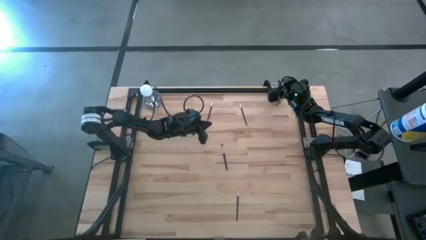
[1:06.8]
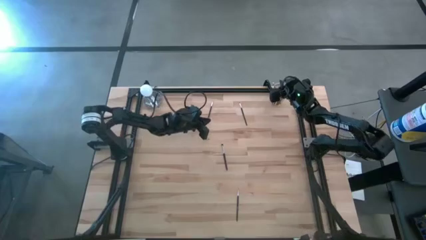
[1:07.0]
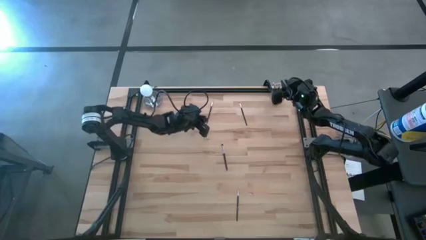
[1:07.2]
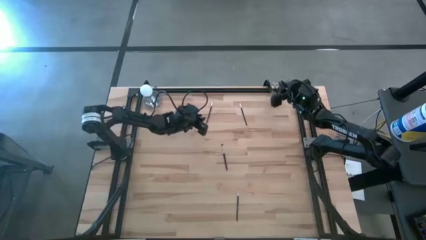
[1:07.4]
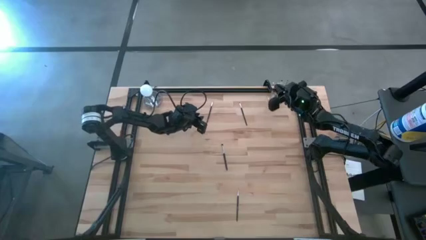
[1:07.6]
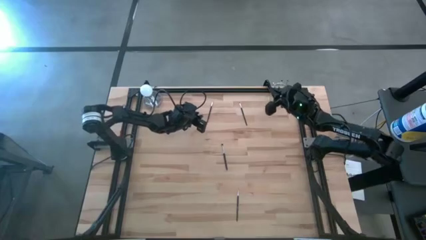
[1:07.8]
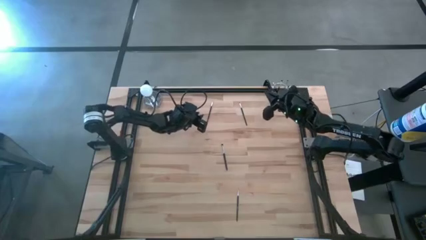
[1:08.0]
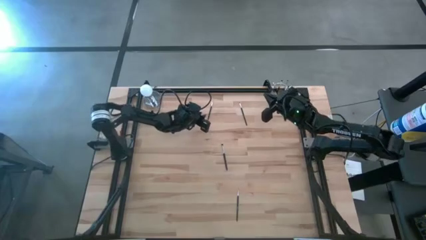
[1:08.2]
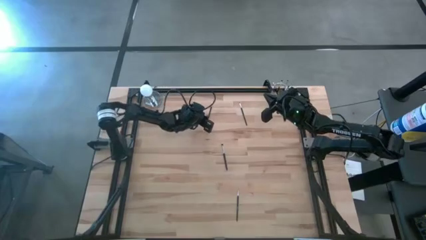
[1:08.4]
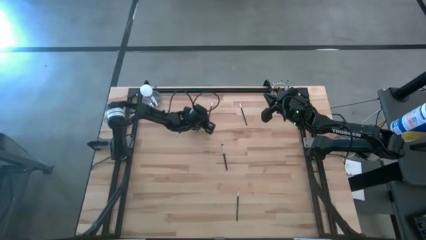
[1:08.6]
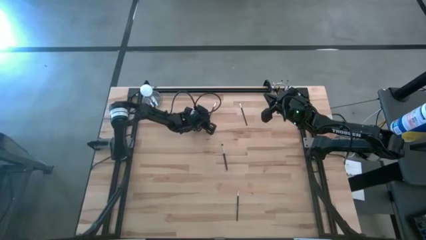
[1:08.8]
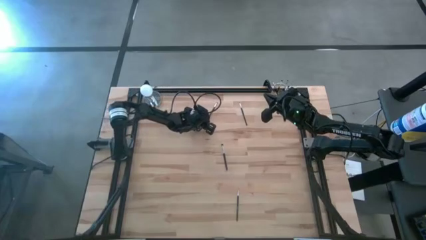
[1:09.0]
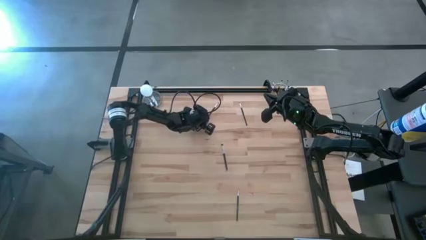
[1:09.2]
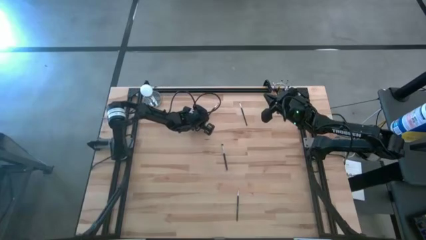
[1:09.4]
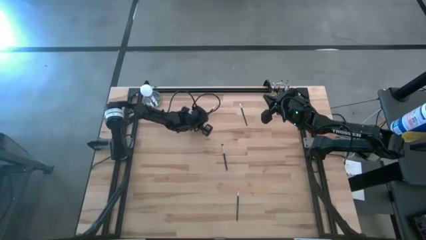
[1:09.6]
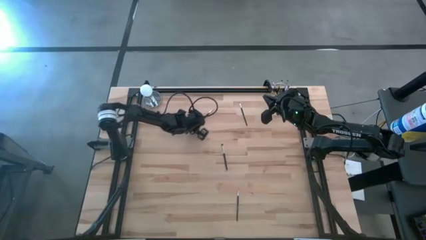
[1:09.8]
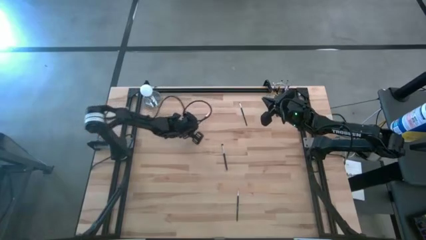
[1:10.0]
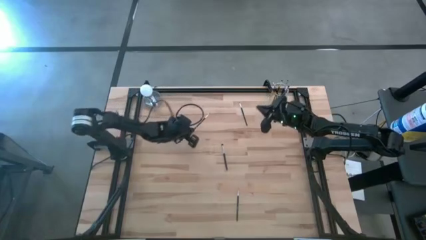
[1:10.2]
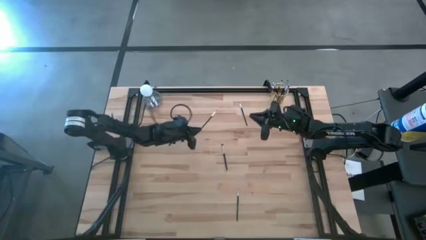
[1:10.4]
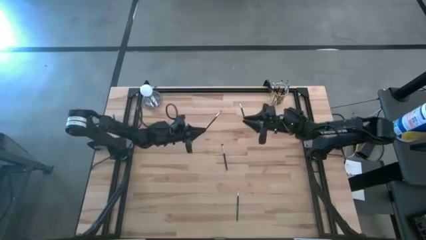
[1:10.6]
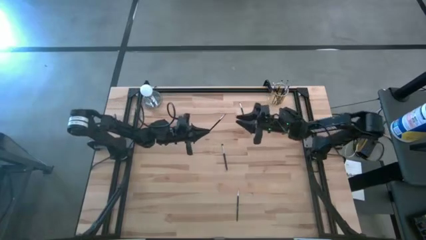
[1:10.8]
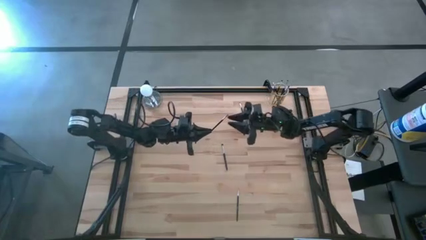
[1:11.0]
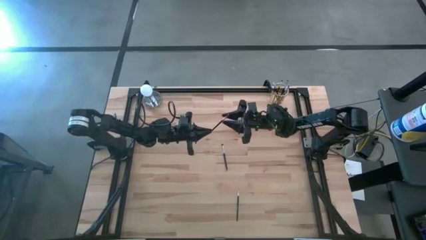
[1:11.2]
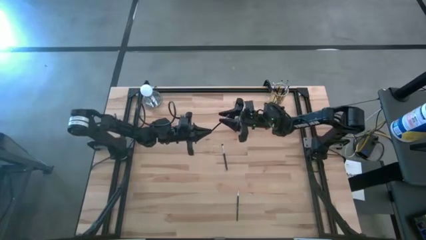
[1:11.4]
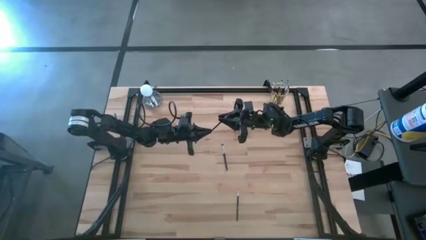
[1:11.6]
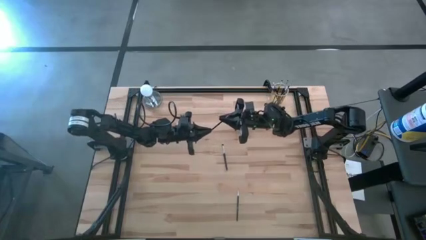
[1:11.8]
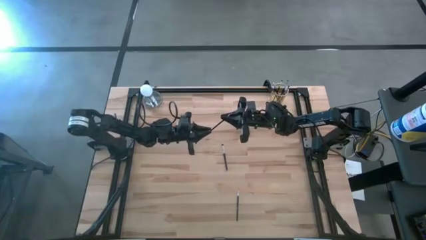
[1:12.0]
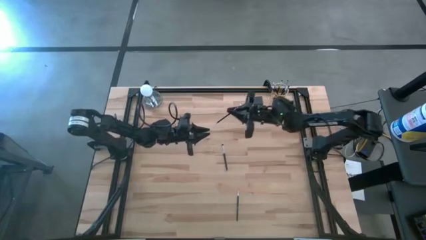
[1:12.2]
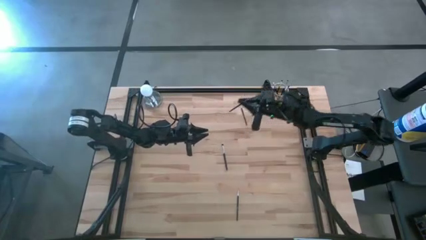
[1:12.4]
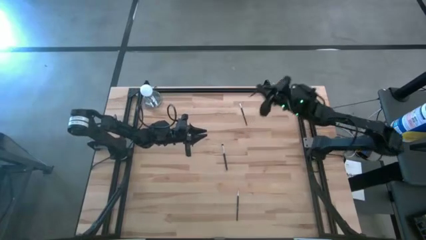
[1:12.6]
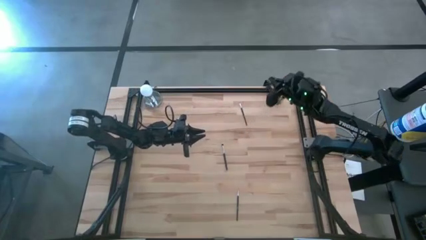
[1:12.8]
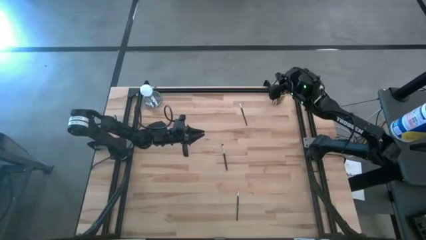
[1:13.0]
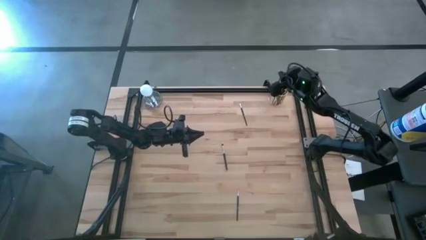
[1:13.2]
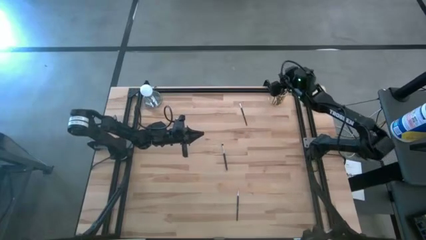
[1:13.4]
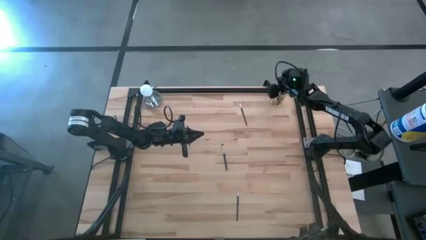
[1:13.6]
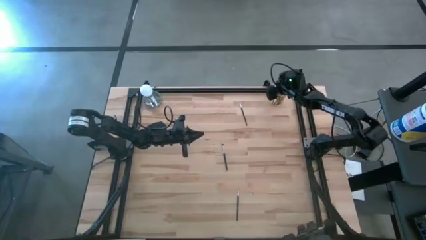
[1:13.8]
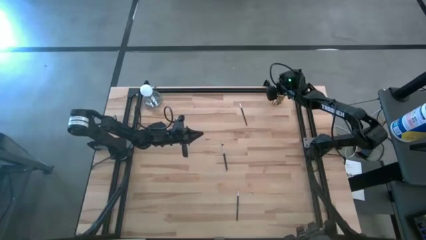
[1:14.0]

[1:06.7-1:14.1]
Task: Sort items
Put the black eyeshadow brush into the gold holder

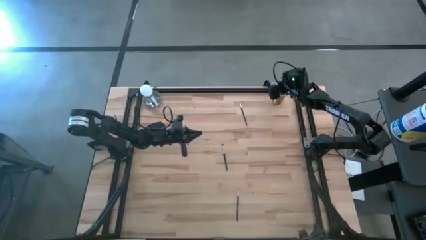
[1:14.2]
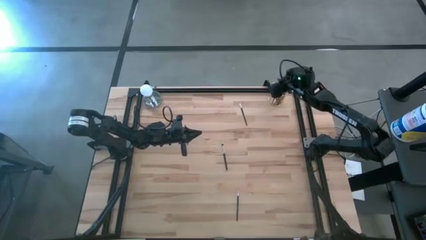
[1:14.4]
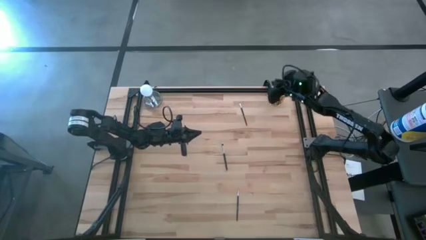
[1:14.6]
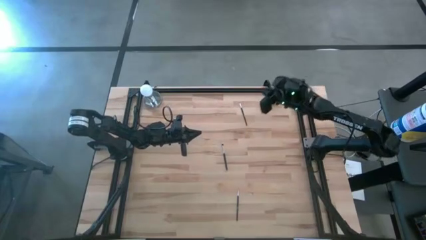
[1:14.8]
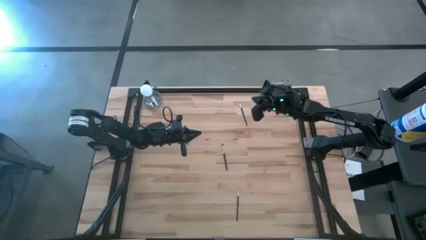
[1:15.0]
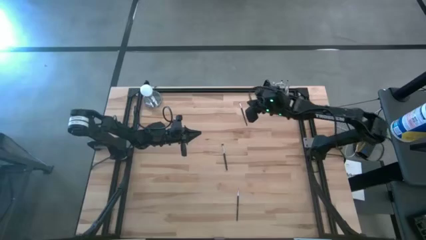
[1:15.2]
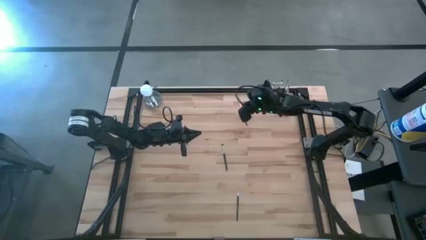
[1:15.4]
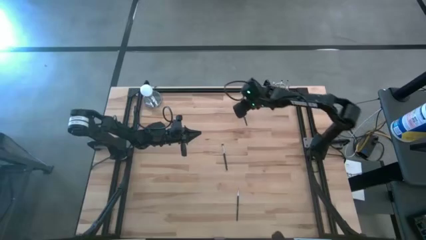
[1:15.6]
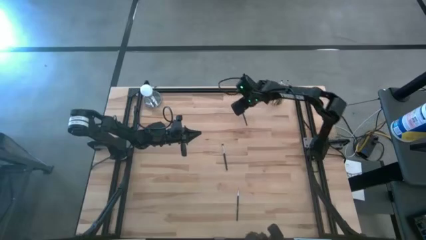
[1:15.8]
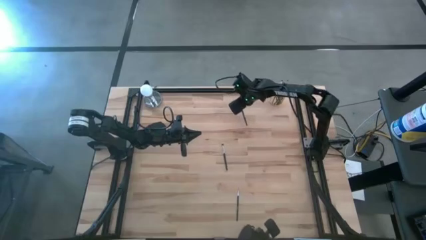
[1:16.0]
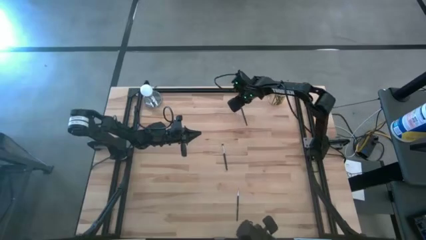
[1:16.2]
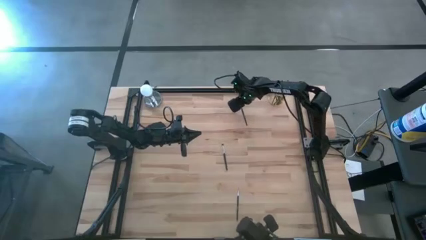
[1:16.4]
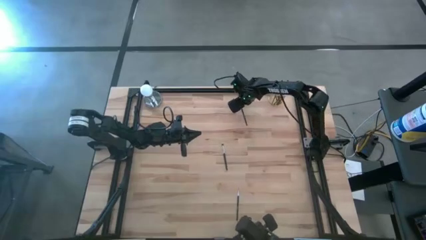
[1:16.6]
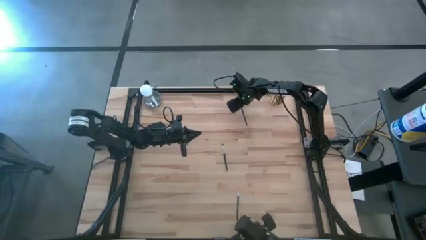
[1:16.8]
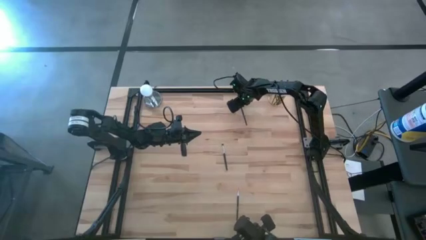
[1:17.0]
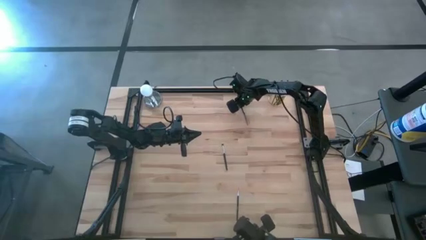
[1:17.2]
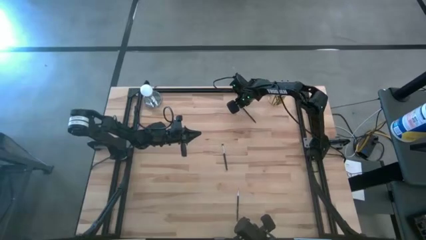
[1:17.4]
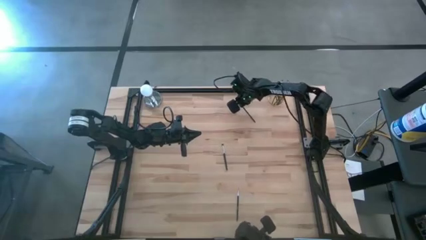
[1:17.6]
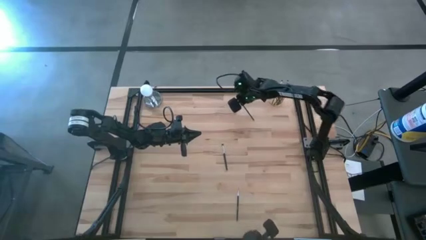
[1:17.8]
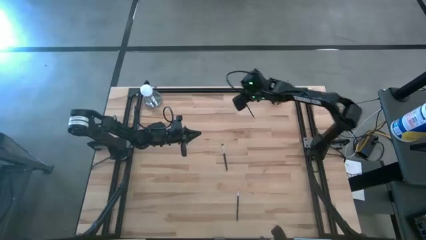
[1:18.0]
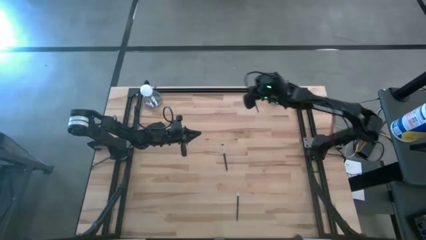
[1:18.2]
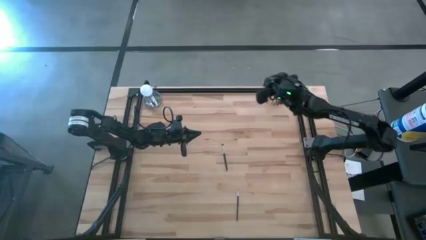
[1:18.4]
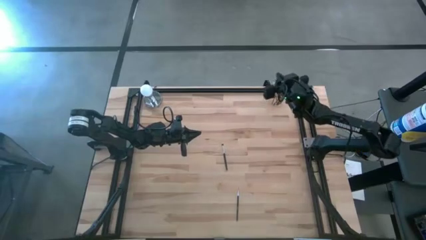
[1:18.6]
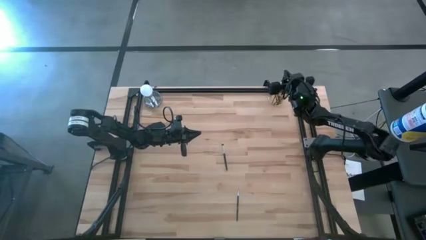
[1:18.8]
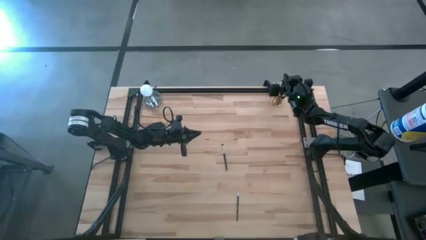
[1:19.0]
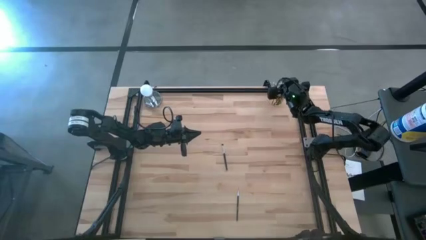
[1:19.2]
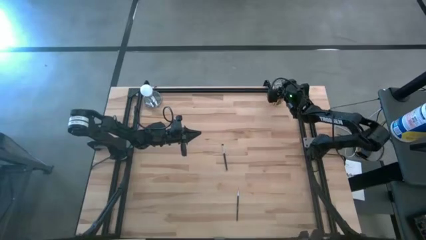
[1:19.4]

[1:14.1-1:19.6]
Put the black eyeshadow brush into the gold holder

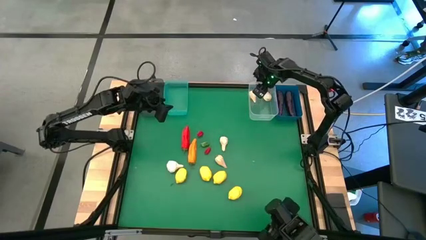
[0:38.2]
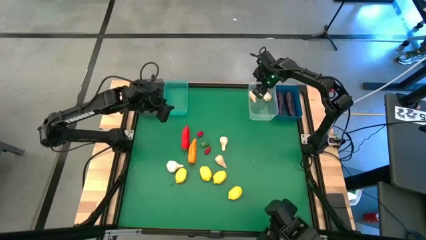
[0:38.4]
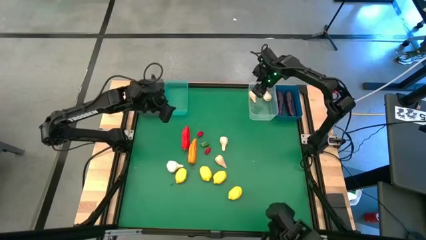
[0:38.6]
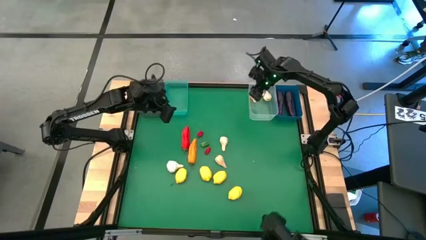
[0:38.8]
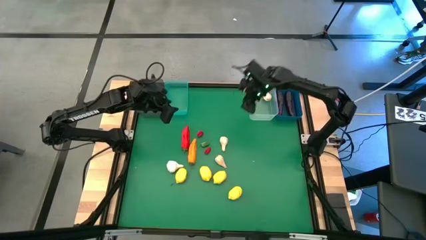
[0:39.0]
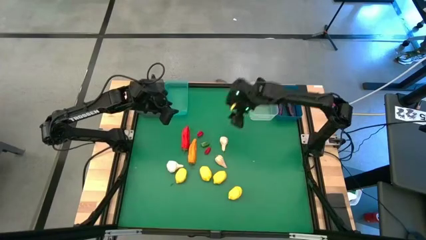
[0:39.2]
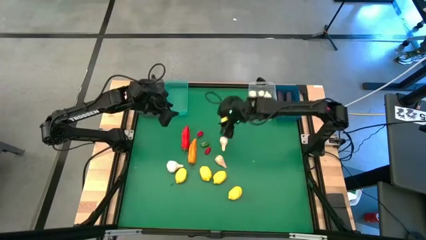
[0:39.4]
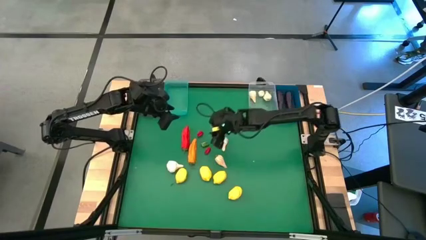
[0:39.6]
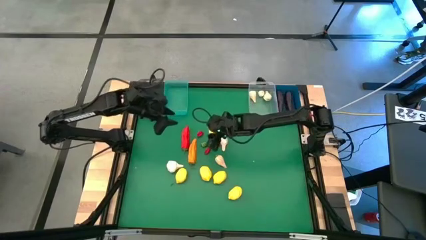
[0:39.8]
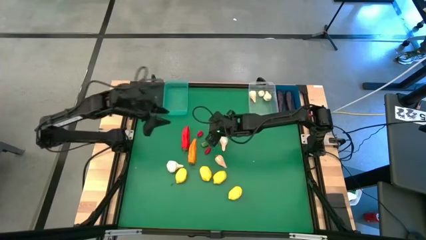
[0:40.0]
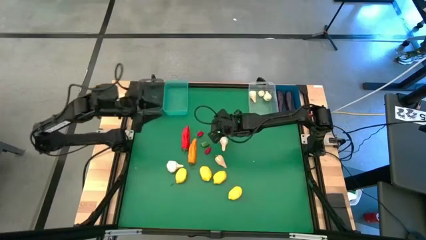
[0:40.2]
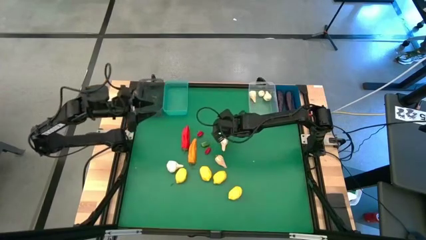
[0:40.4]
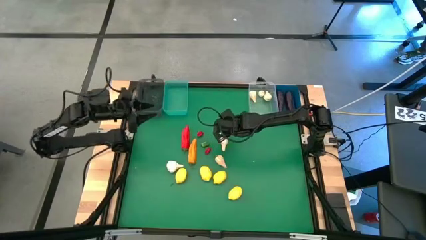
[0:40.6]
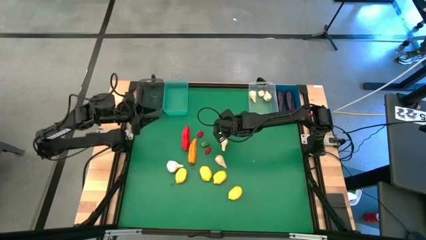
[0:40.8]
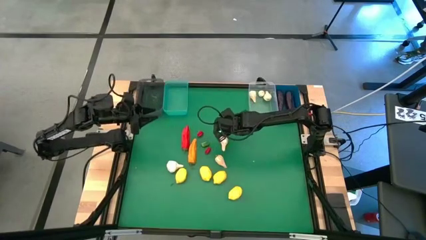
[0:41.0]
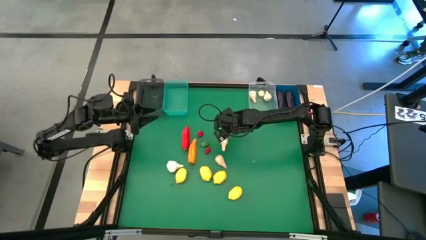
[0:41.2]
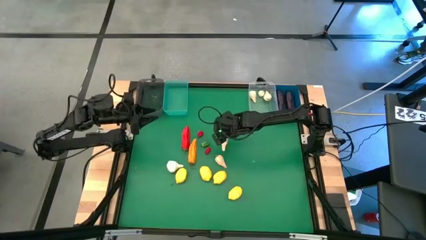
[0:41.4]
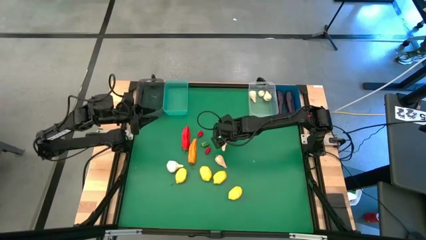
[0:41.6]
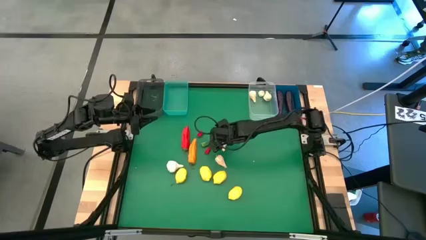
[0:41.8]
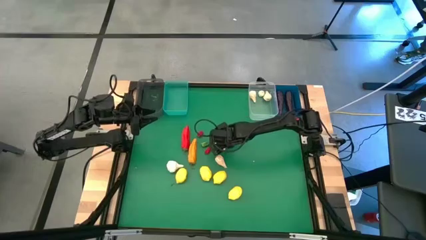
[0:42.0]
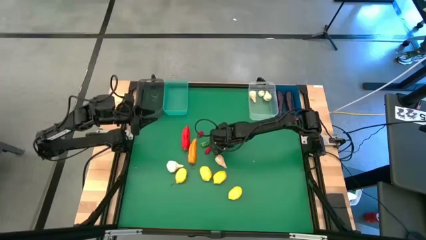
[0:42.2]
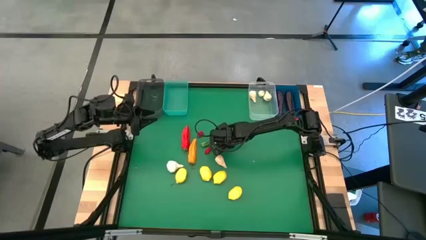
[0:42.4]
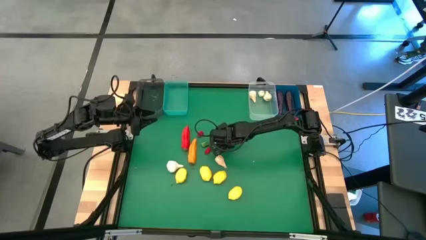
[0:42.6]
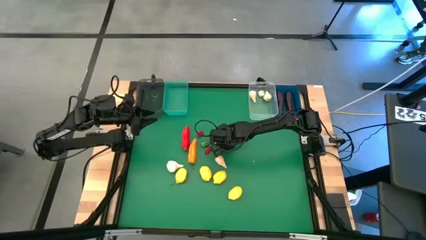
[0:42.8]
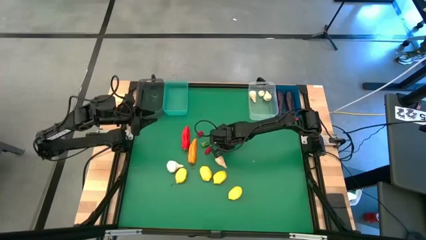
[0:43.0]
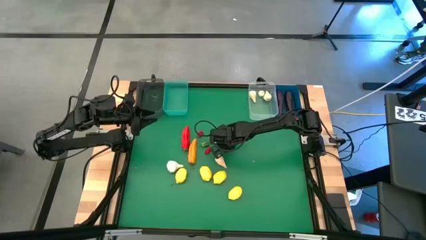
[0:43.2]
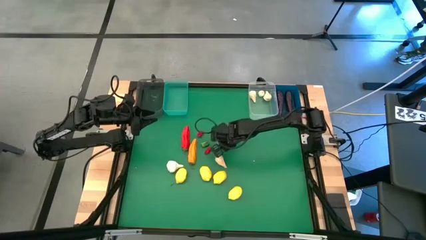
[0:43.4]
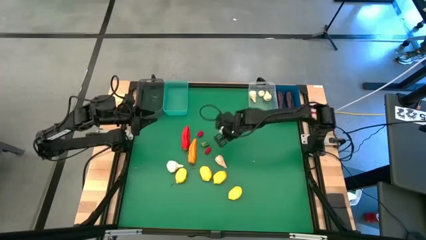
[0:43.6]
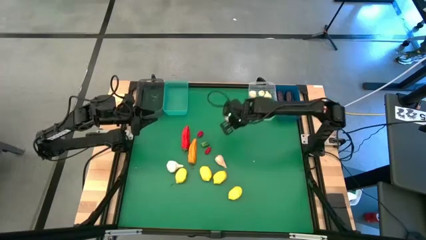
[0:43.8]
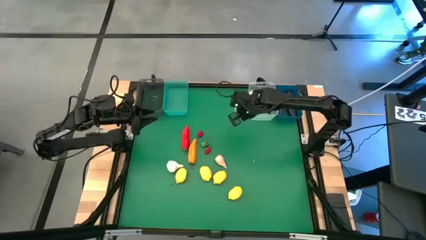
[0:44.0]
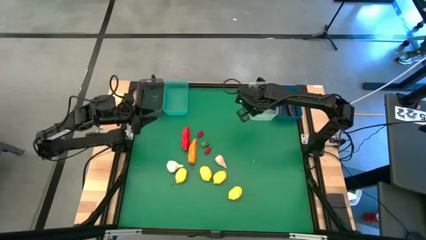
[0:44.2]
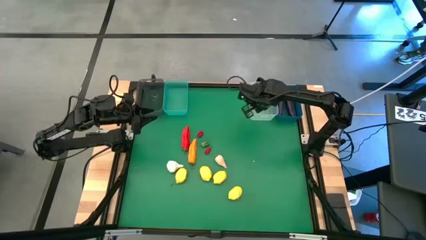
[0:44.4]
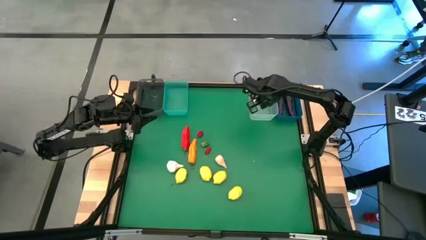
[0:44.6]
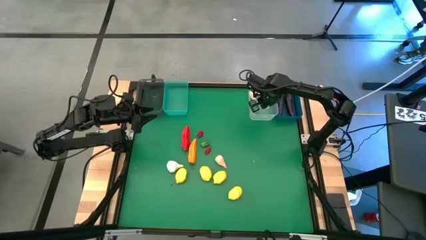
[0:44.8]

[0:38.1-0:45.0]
Task: Sort produce into baskets
Put the garlic into the transparent bin
